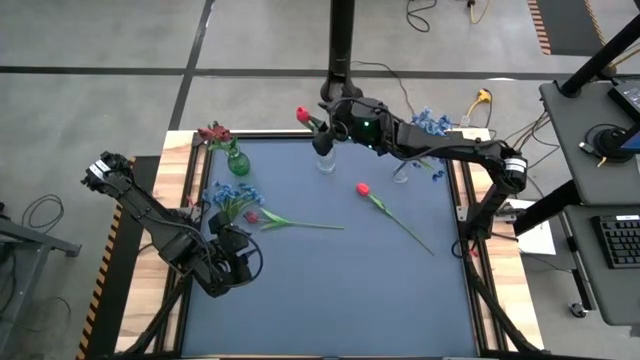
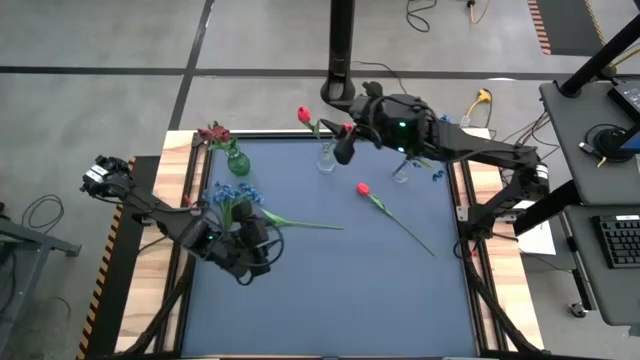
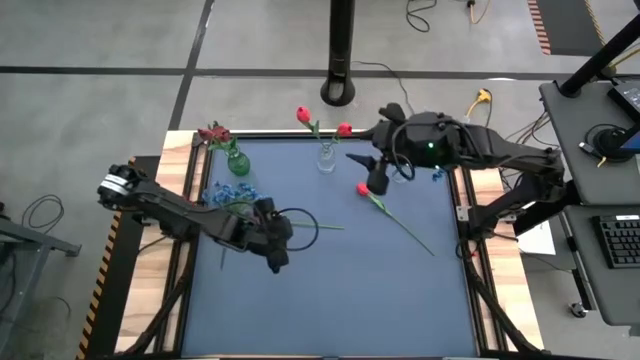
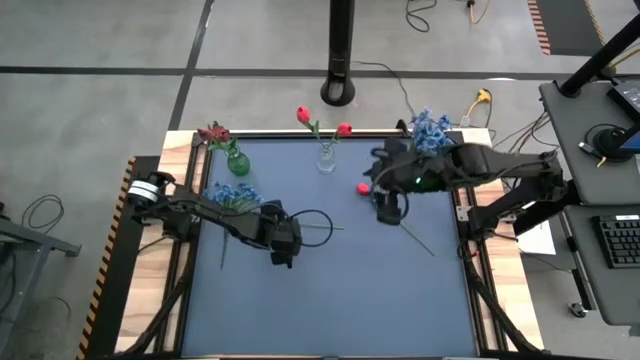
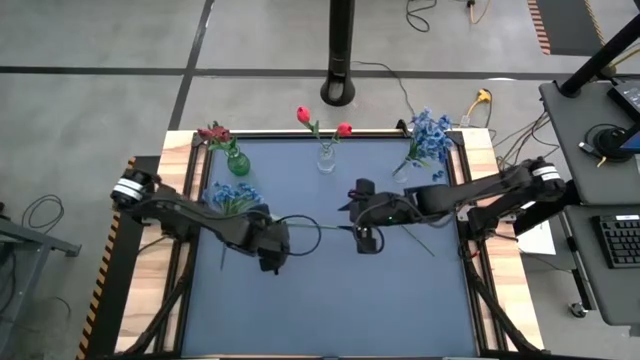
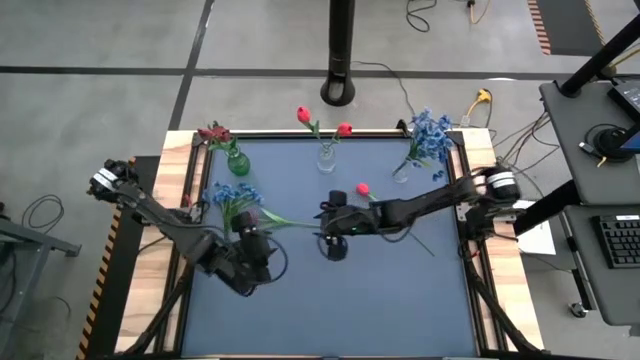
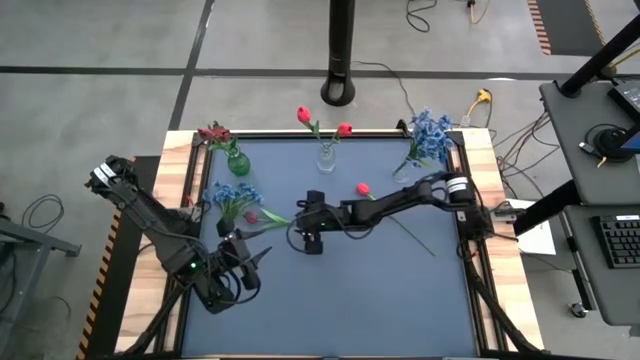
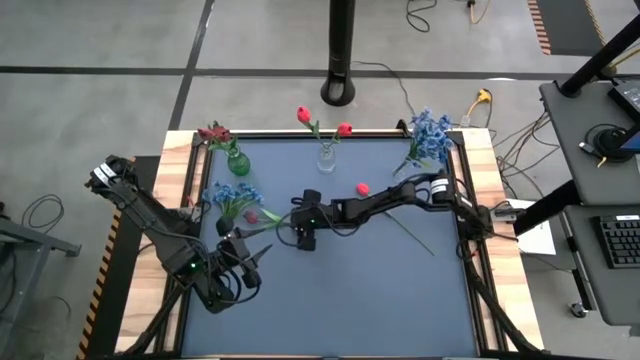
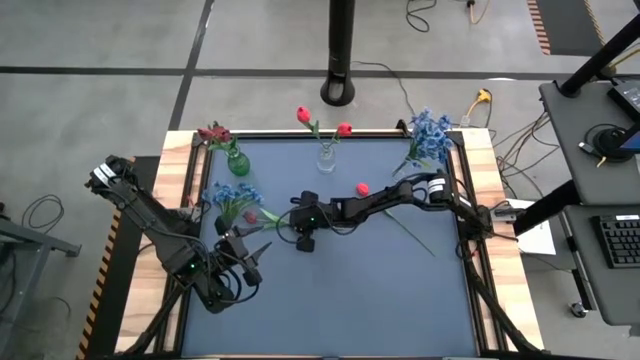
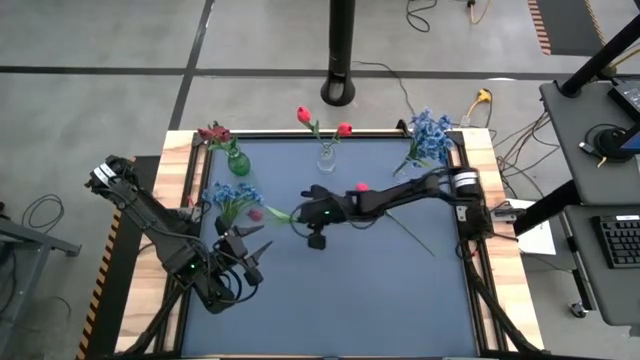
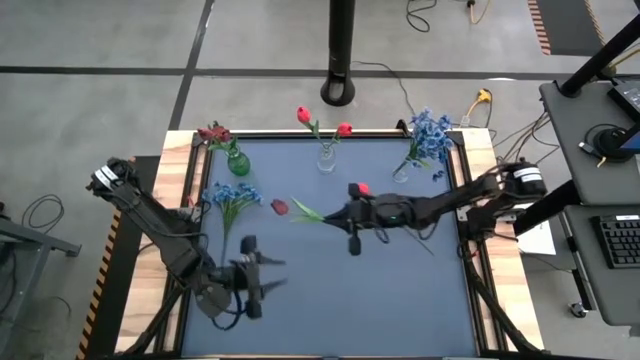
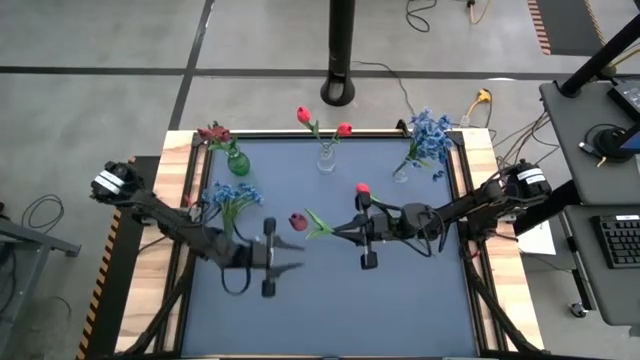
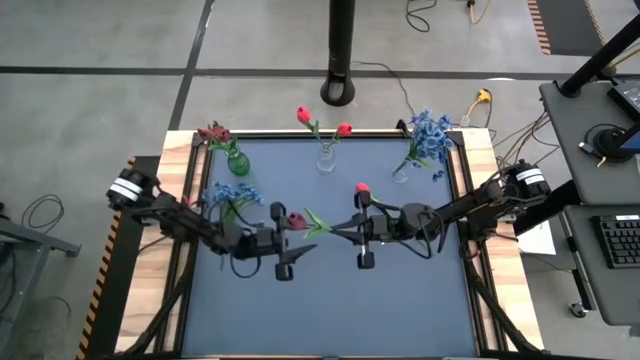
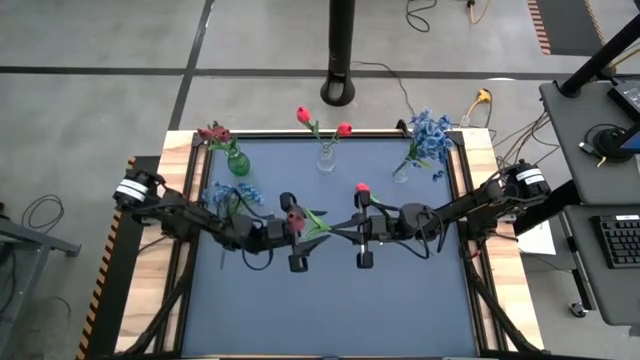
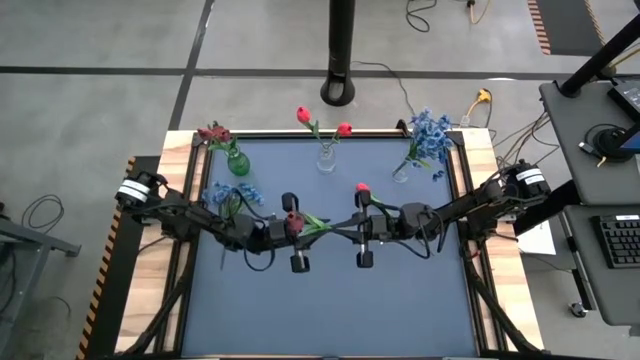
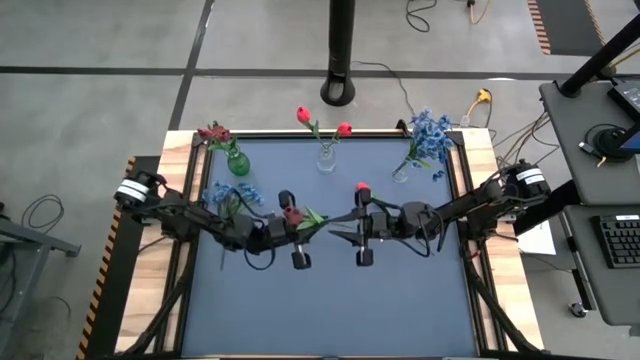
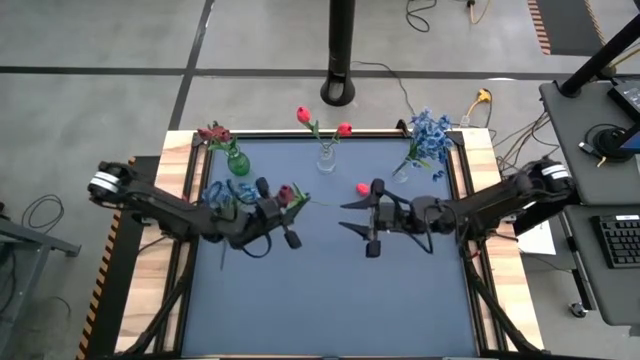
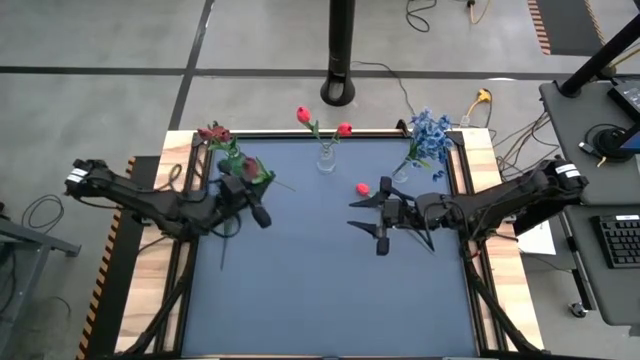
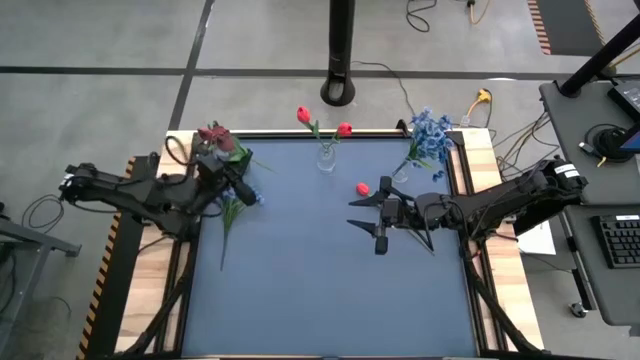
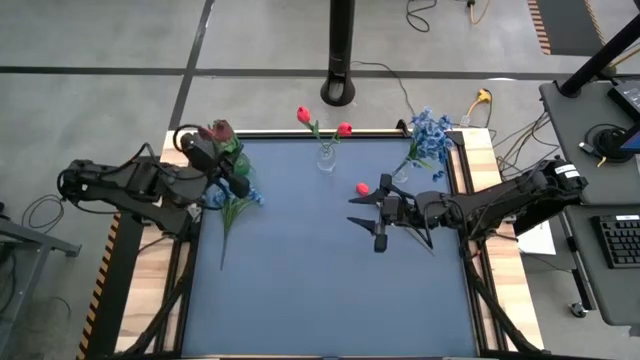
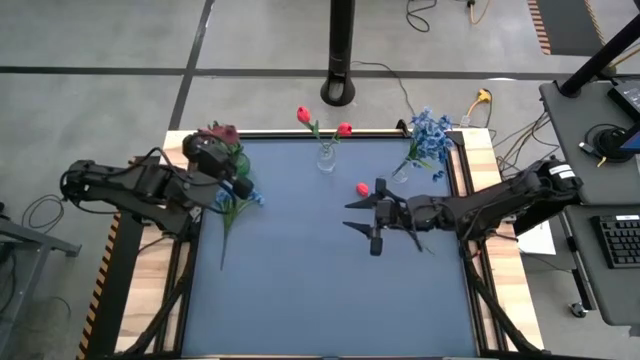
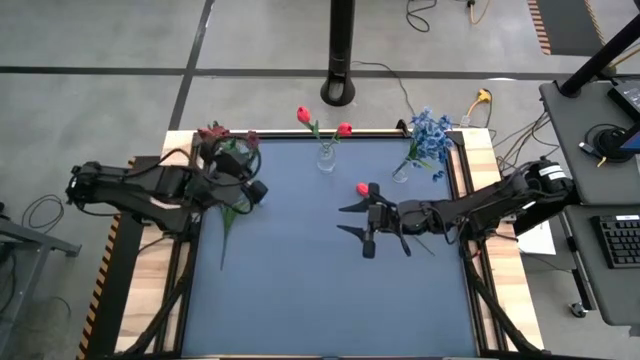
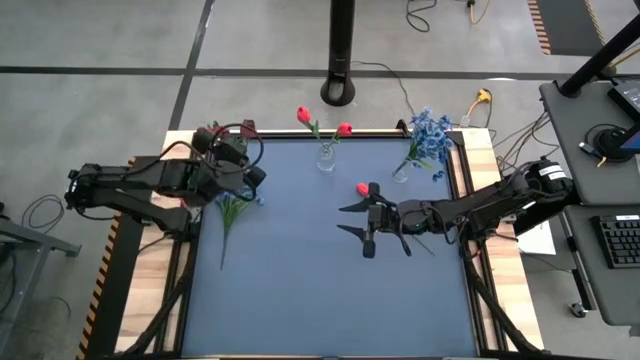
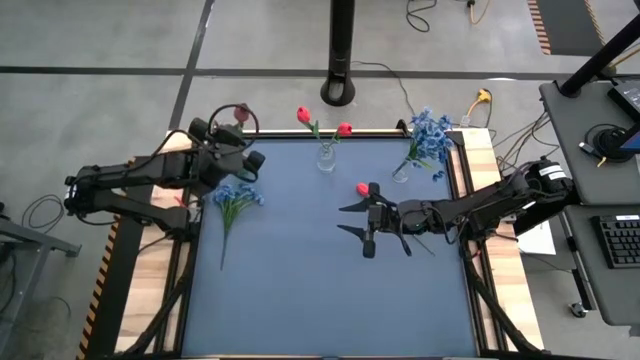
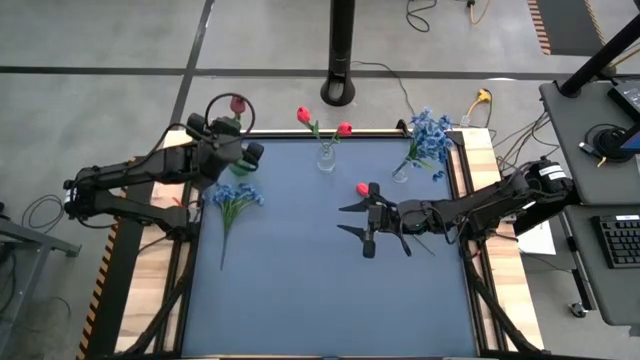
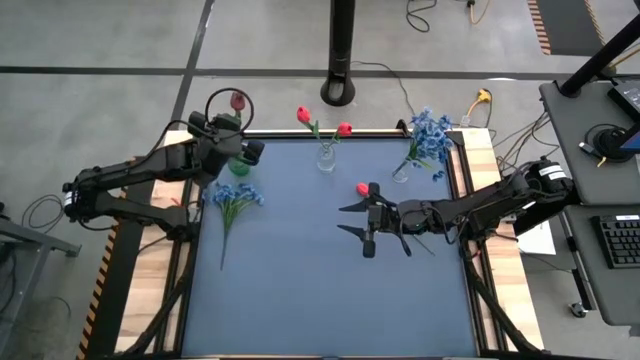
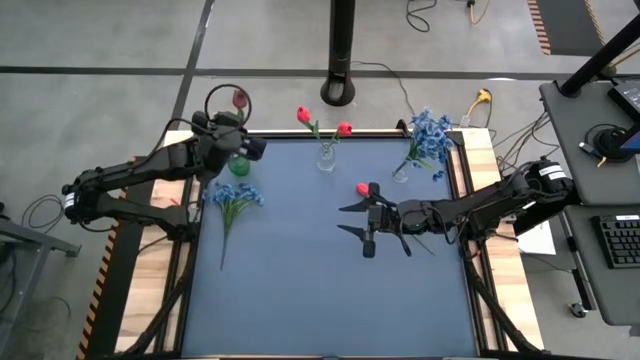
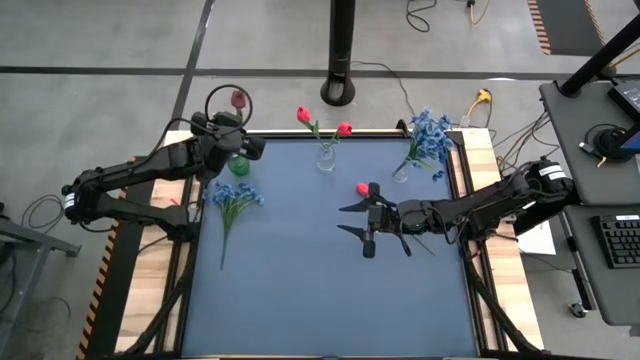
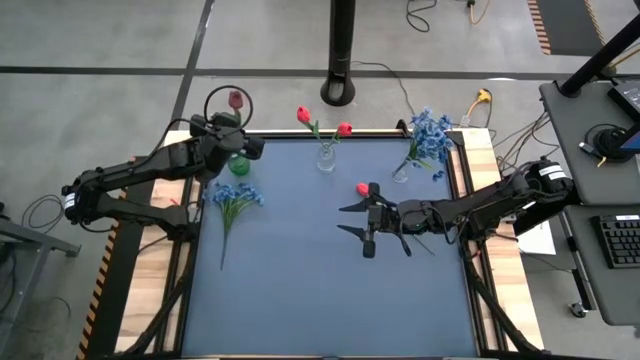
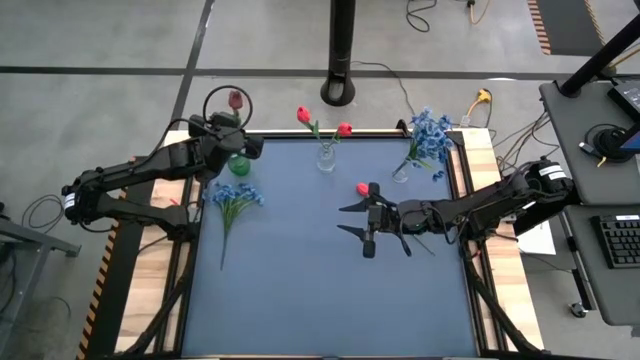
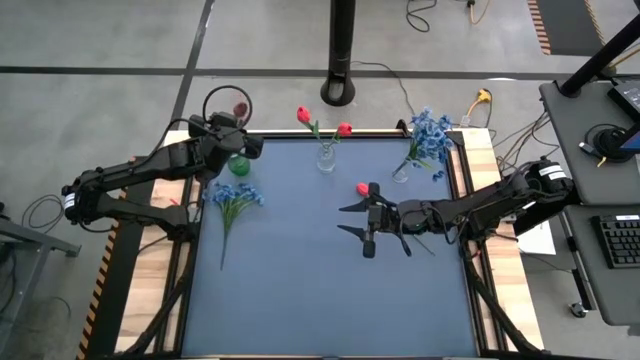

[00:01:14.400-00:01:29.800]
Task: Sort flowers into vase by color
Put the dark red flower into the green vase

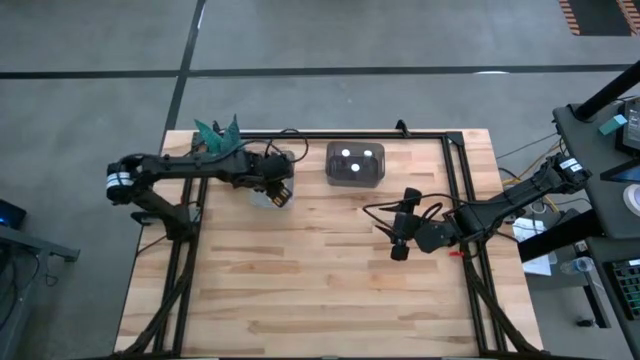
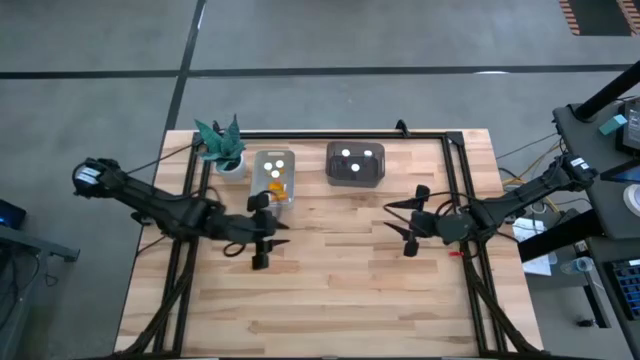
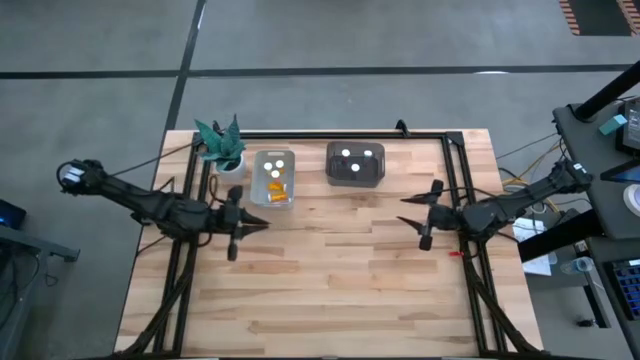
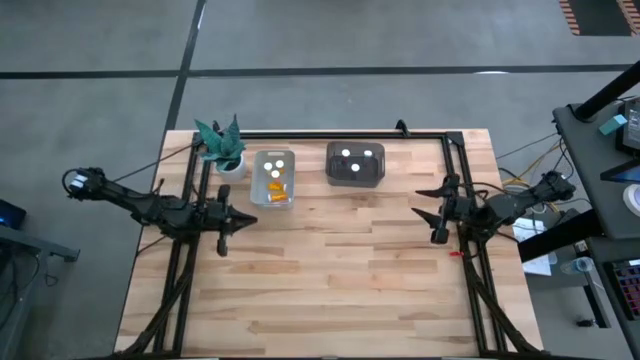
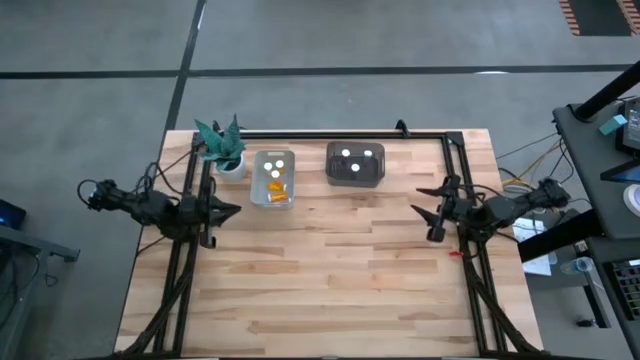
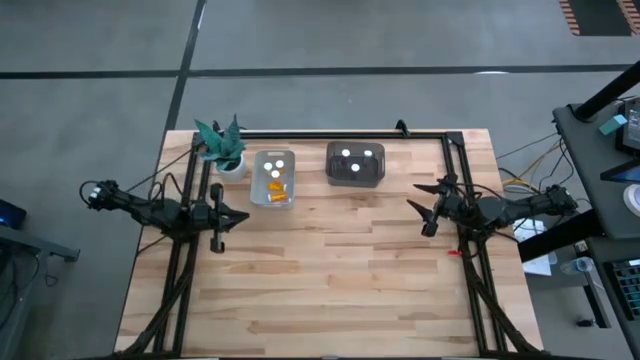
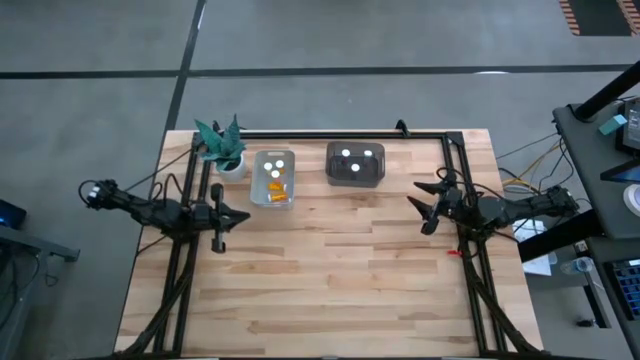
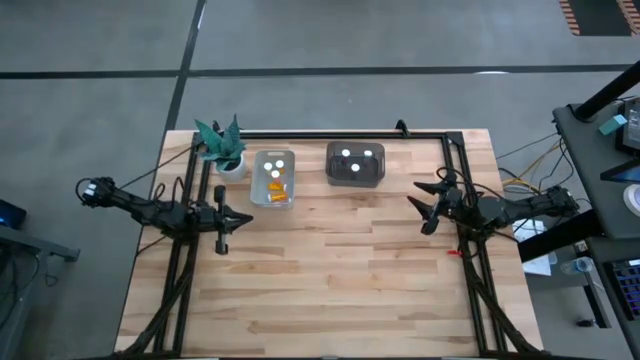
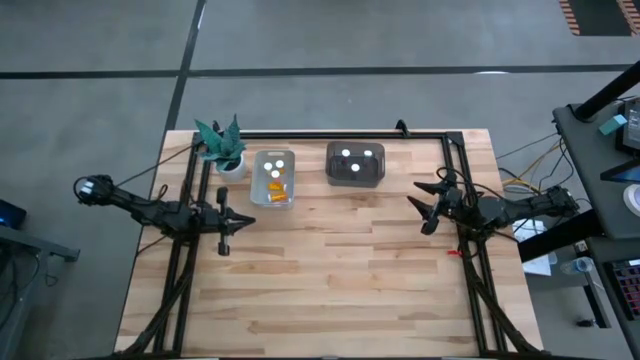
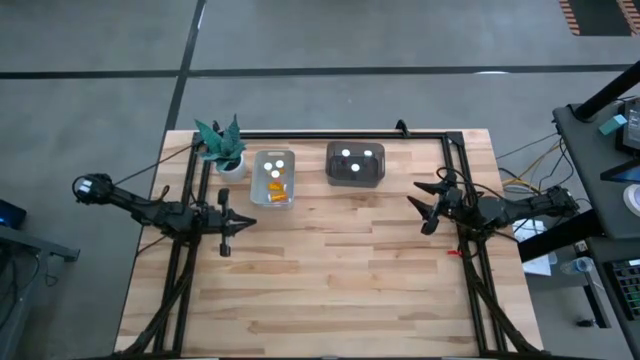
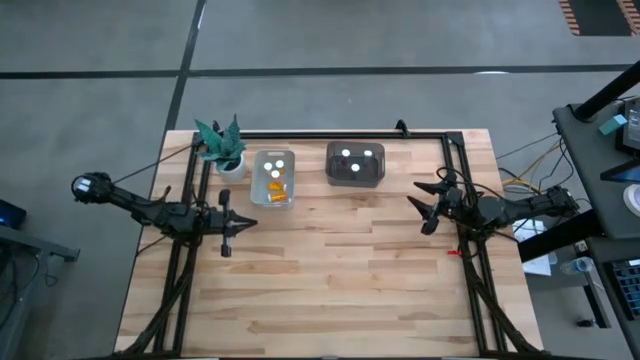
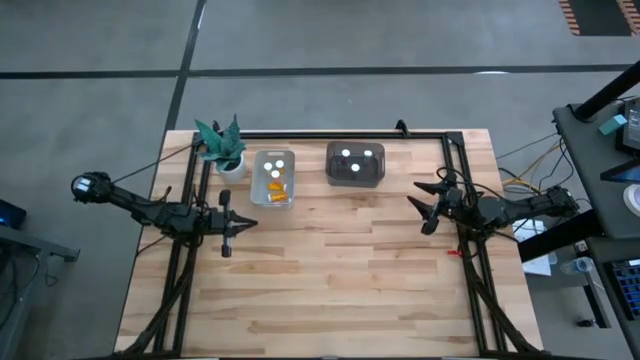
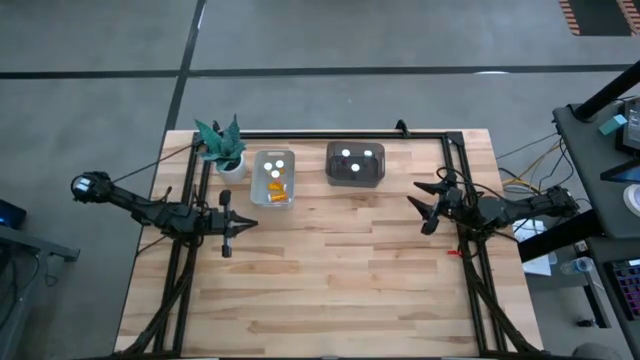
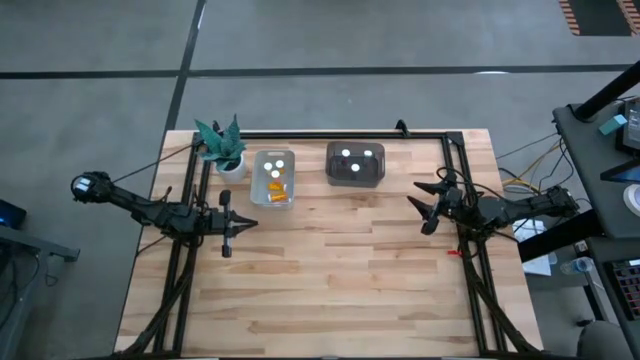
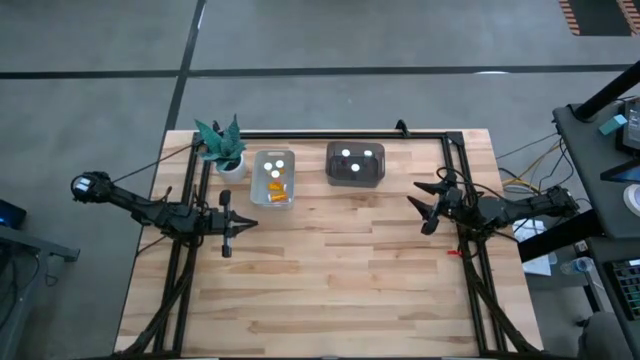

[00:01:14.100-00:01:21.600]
Task: Pick and place medicine bottles into bin by pill shape (circle, oval)
Return to Home Position
